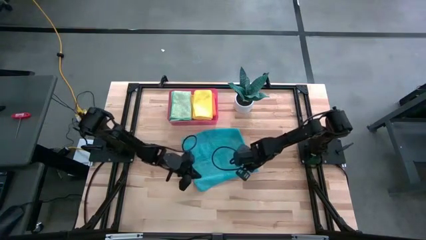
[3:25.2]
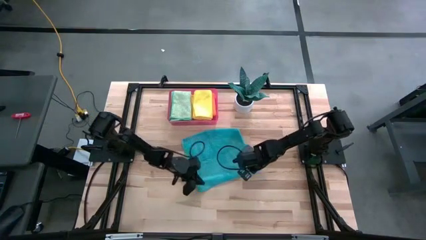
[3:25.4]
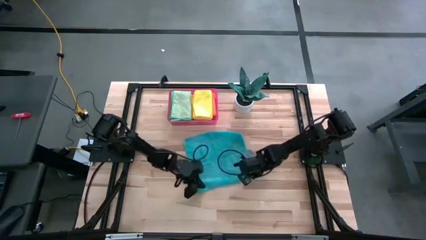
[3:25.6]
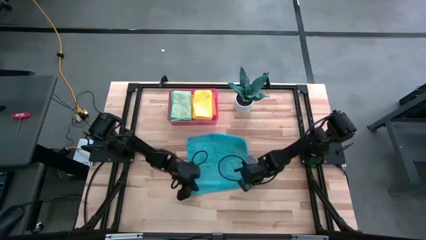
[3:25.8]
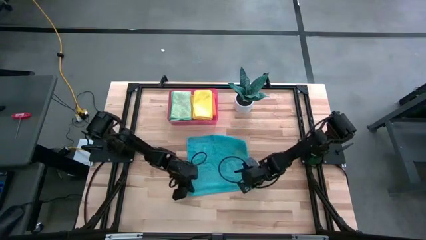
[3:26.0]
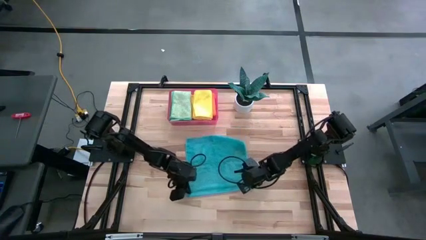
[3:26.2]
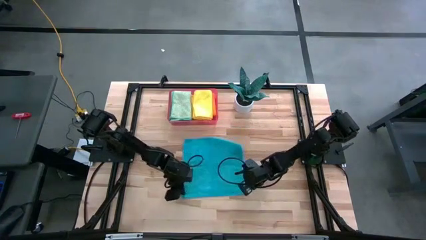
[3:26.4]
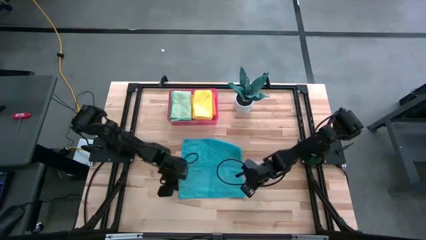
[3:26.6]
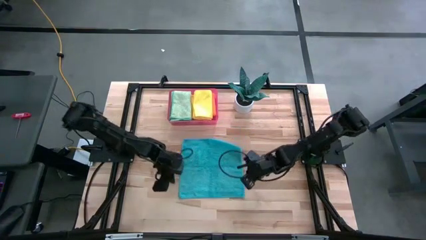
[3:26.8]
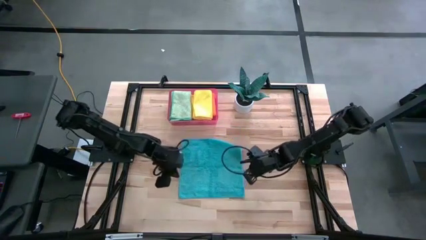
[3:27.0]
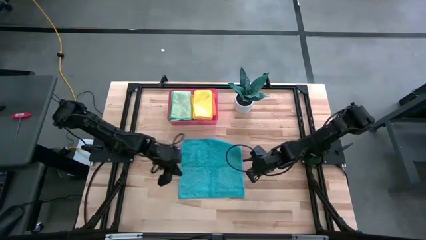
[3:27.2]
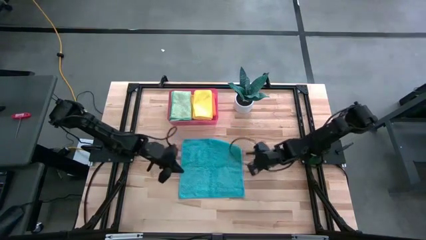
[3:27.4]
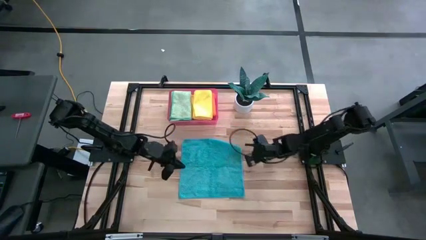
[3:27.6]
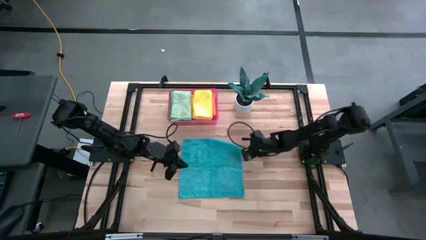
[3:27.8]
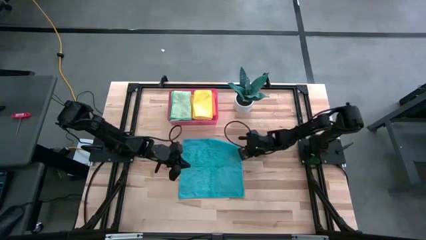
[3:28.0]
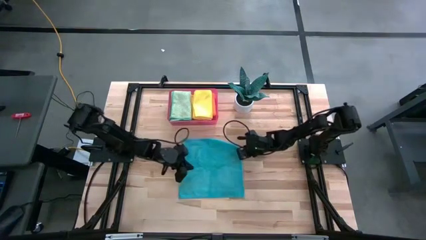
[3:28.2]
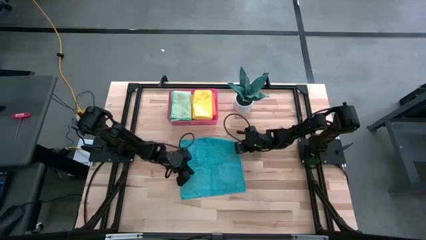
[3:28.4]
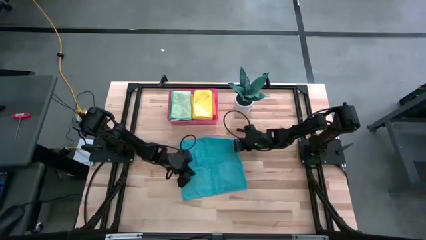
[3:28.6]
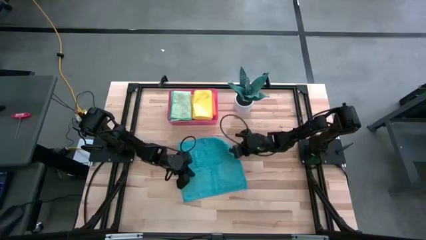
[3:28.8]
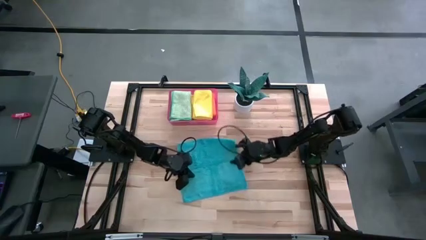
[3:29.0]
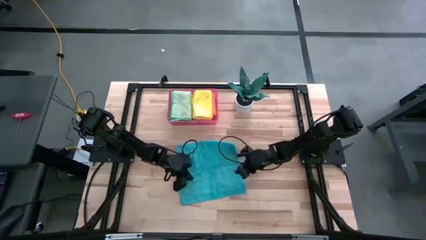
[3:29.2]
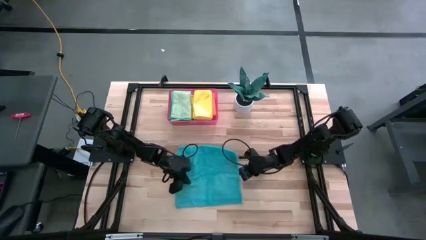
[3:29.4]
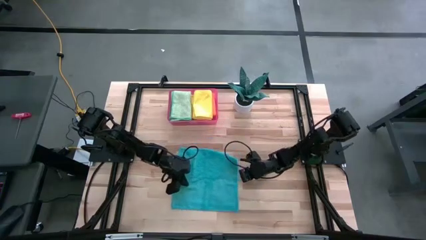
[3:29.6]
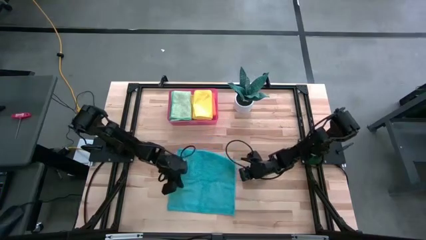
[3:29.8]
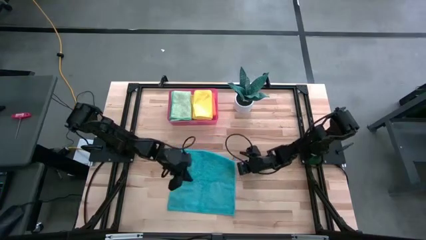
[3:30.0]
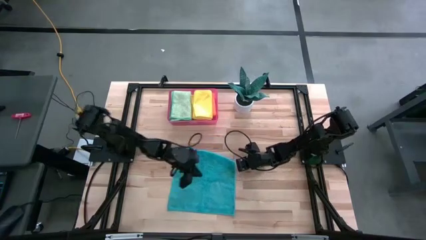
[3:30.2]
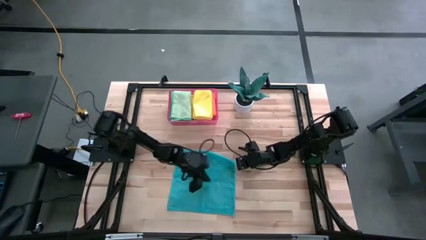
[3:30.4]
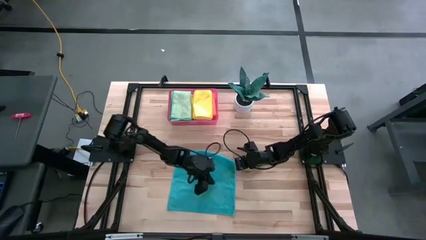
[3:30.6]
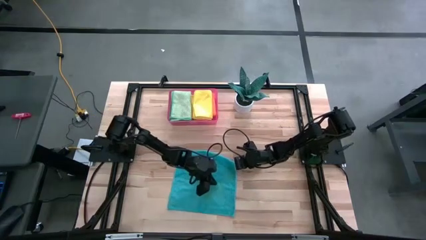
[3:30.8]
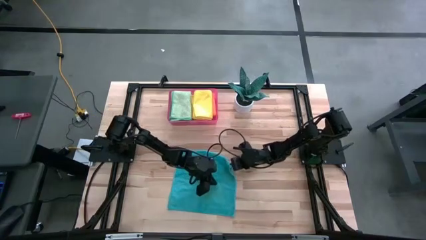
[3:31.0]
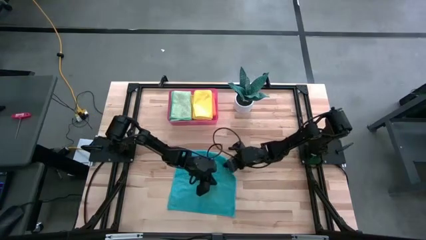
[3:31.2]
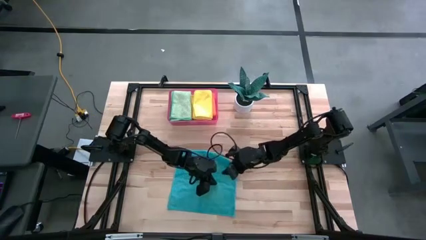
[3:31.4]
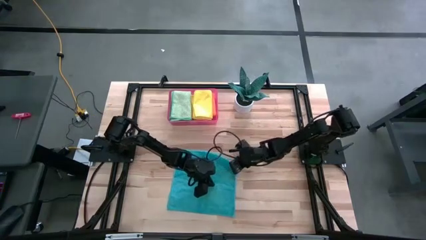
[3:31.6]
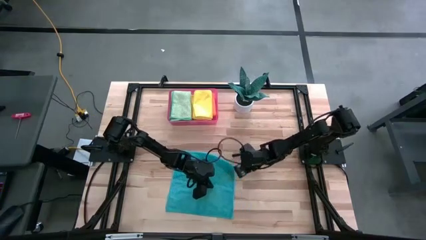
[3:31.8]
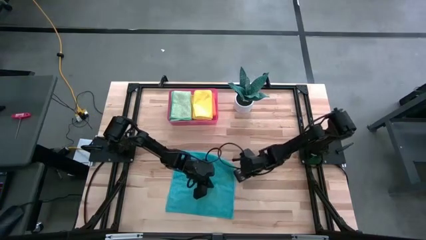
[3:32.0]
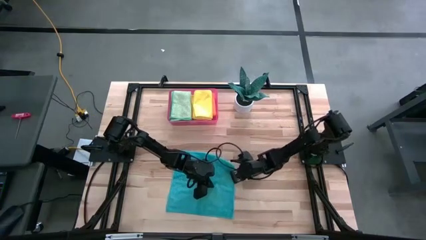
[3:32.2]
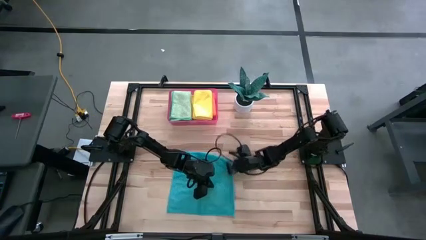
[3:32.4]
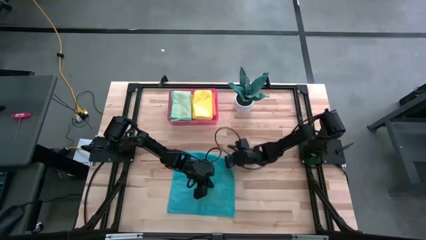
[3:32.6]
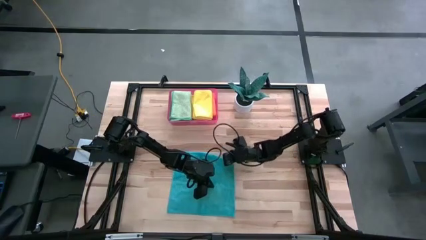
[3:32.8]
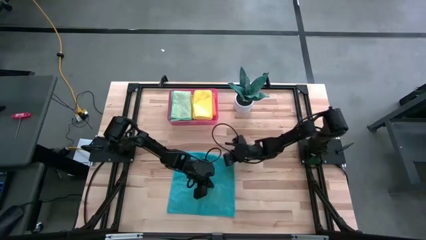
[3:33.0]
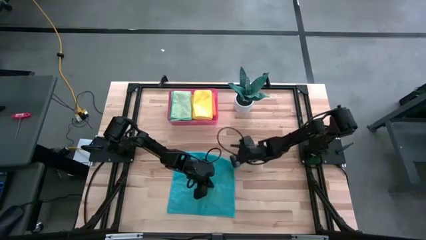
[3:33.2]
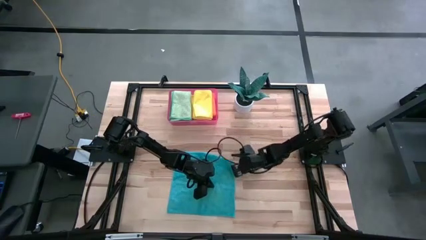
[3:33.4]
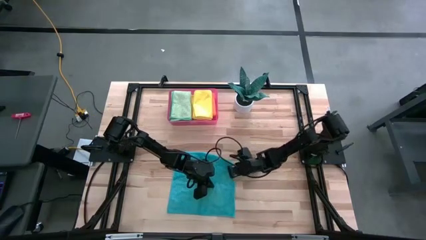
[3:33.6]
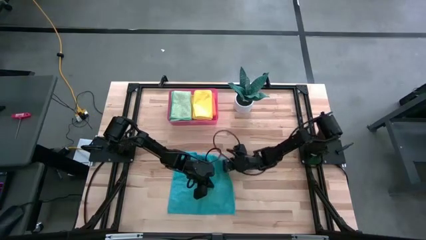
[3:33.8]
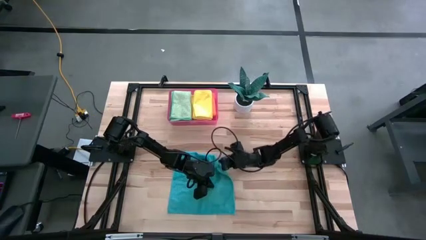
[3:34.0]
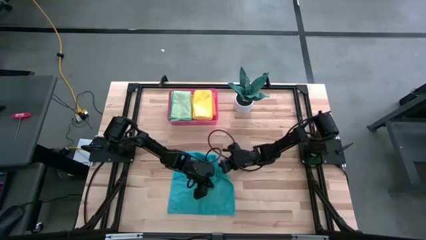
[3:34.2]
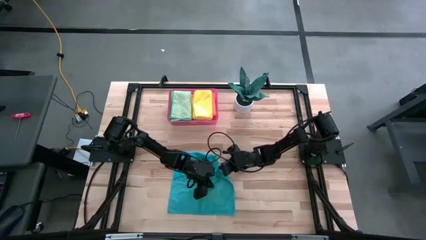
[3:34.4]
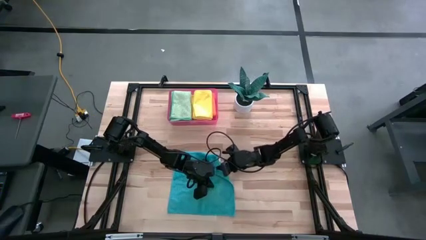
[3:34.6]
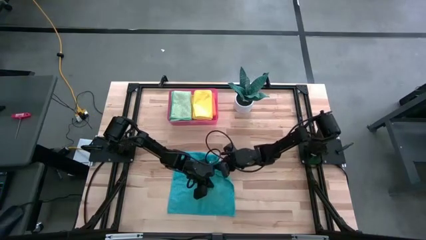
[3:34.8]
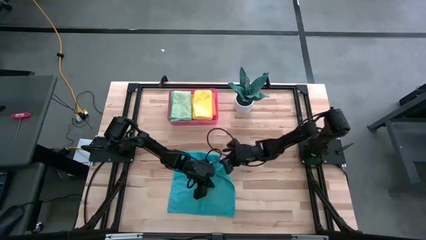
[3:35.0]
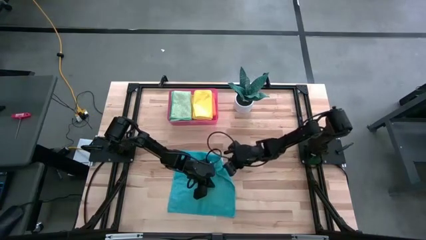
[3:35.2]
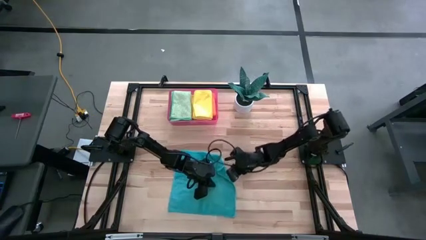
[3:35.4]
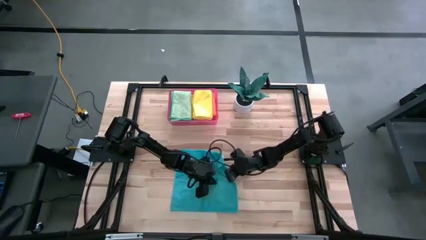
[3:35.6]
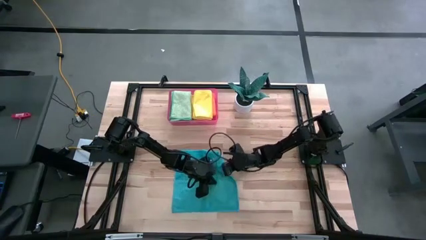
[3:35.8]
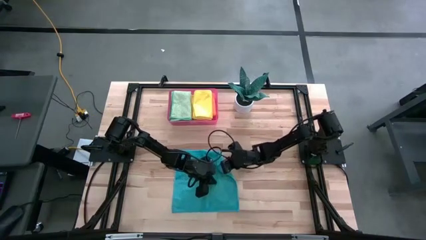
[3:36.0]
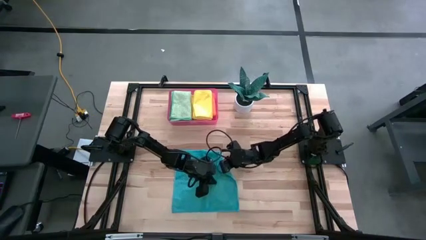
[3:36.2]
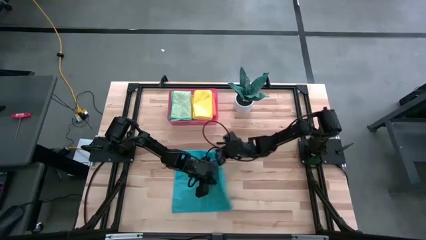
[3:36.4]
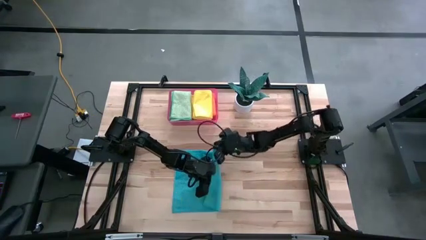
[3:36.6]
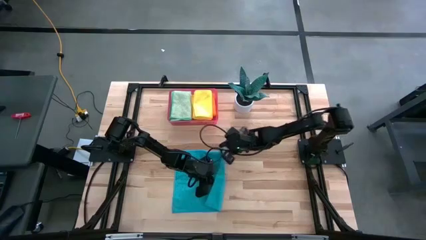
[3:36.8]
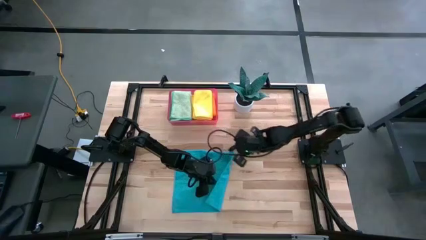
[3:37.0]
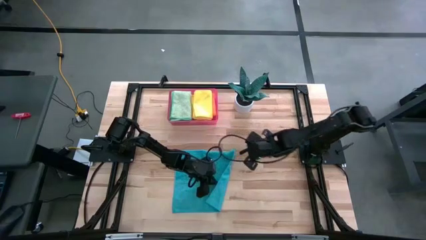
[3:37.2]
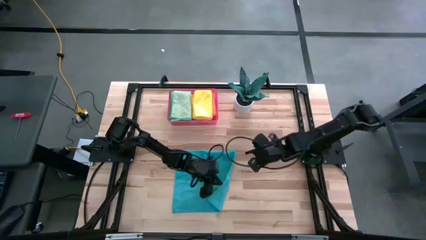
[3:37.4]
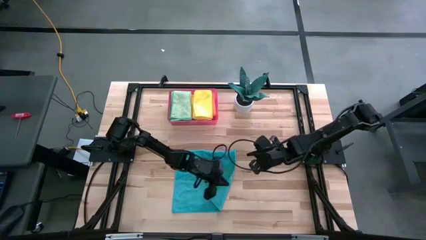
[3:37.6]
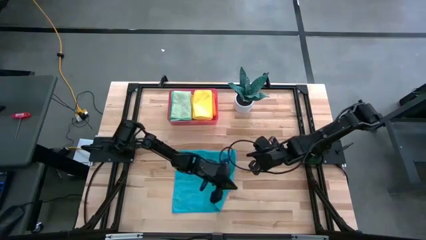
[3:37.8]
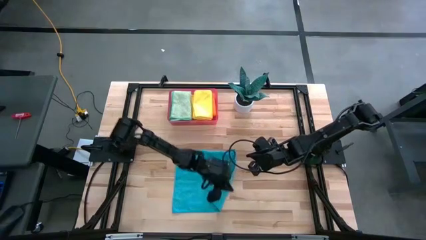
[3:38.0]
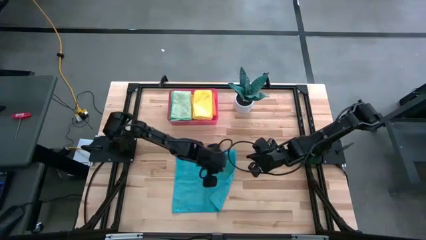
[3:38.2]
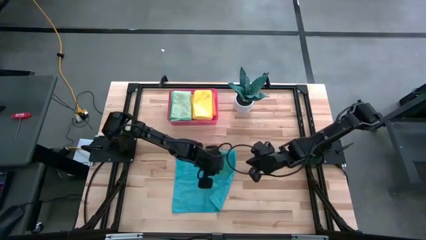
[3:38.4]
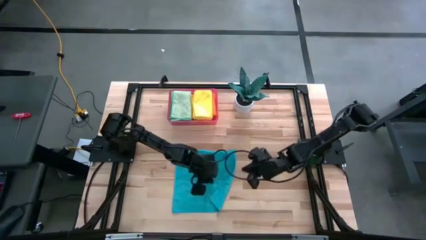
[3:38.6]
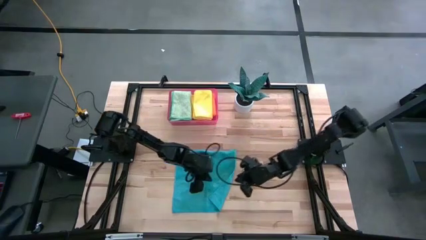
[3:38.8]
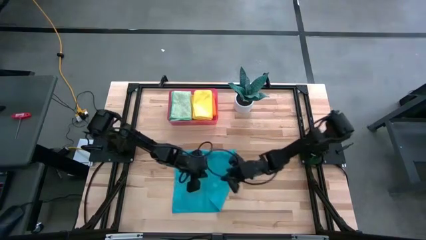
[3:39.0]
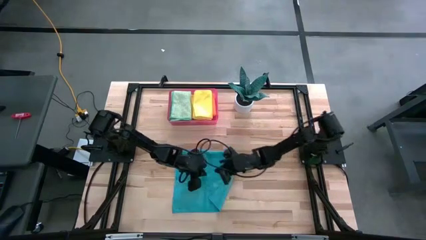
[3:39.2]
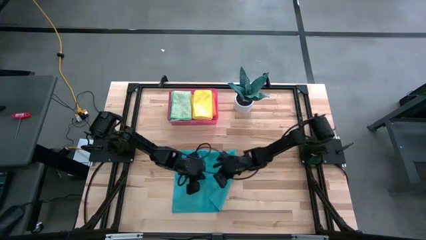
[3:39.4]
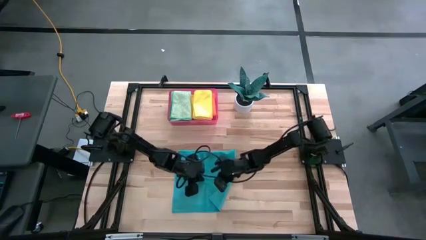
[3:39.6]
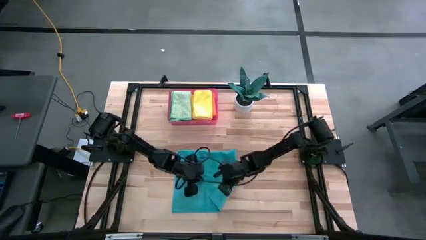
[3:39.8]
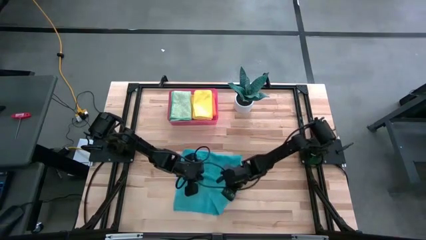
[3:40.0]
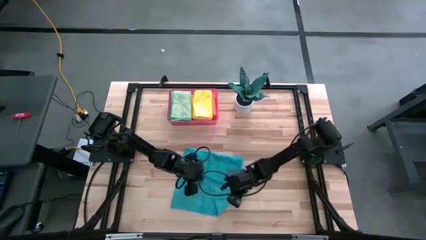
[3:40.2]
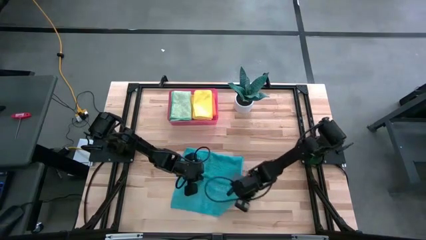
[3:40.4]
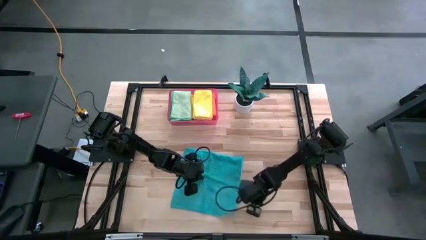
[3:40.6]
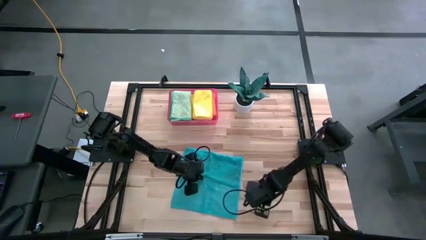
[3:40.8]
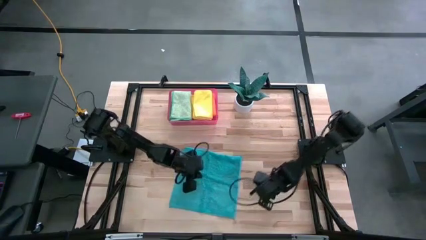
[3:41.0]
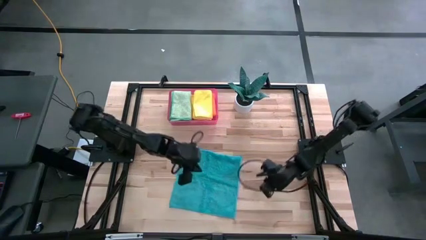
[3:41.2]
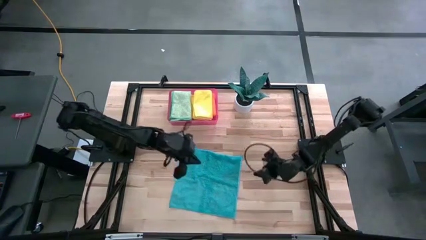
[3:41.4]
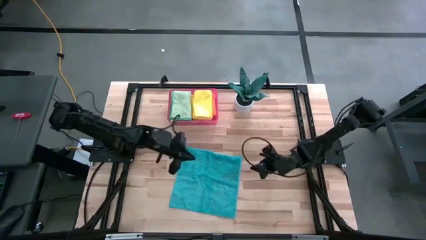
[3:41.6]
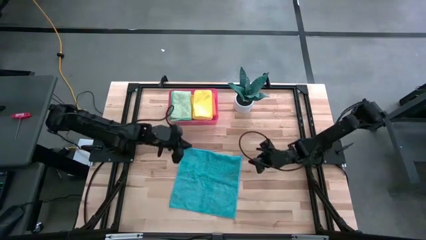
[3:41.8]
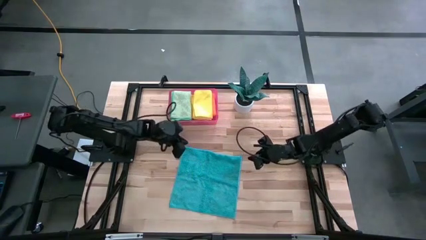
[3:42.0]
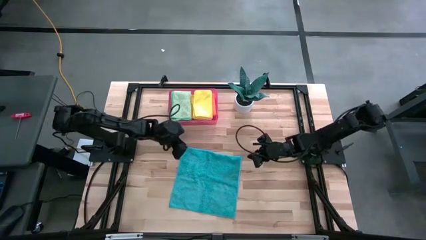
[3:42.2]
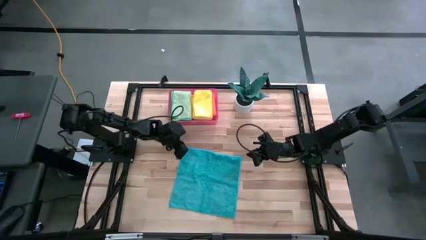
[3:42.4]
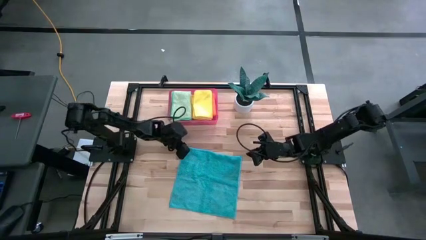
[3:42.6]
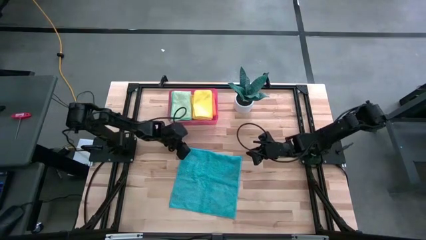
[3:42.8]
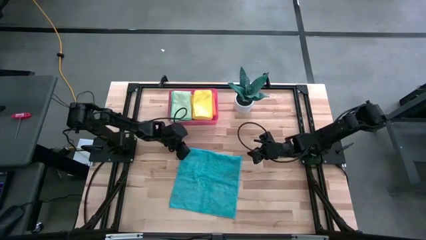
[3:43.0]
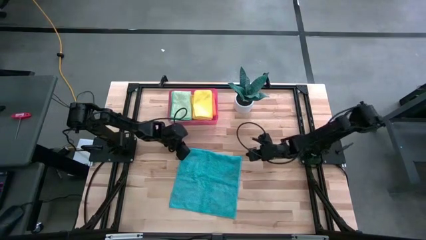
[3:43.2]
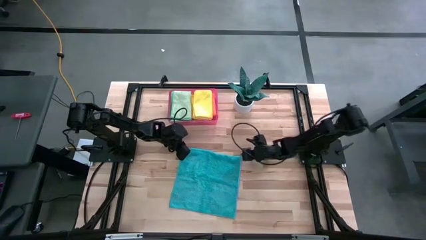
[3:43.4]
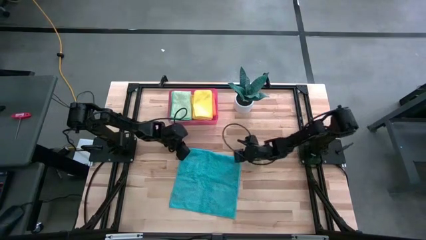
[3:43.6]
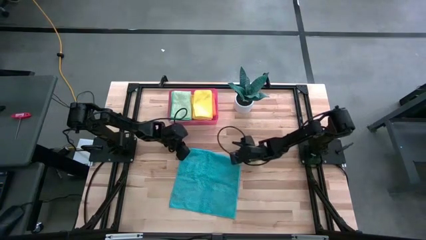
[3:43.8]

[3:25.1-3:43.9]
Task: Fold microfiber towels
Fold the blue microfiber towel
